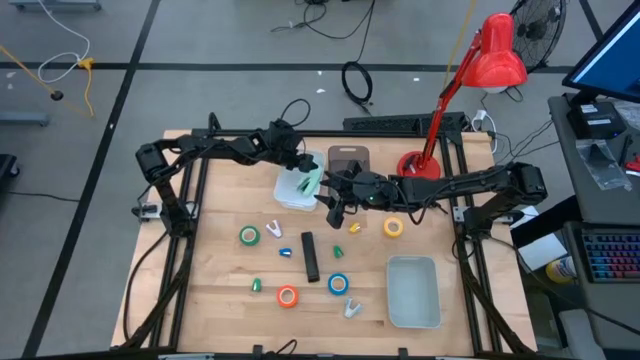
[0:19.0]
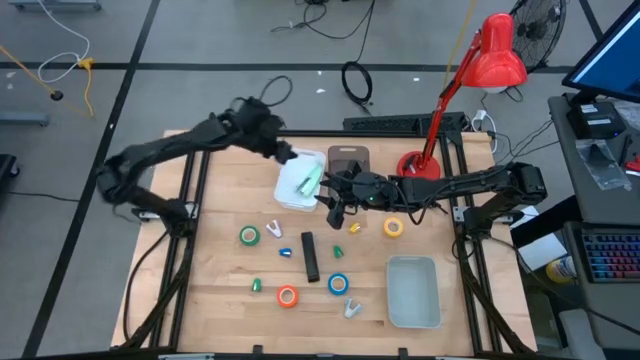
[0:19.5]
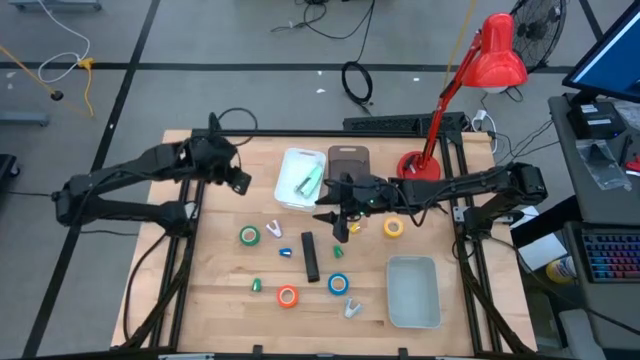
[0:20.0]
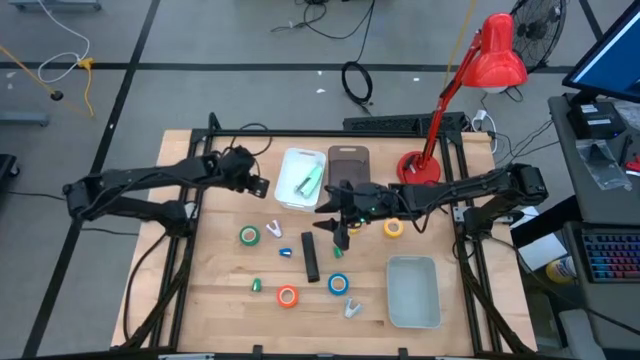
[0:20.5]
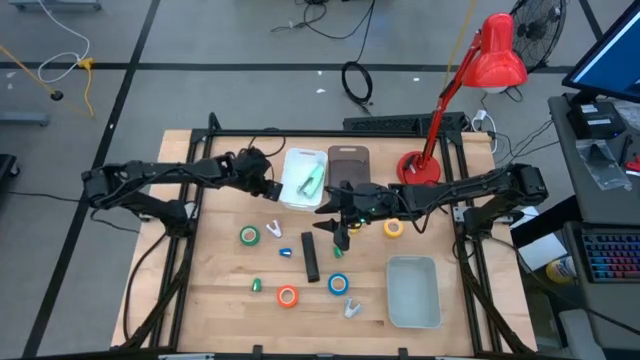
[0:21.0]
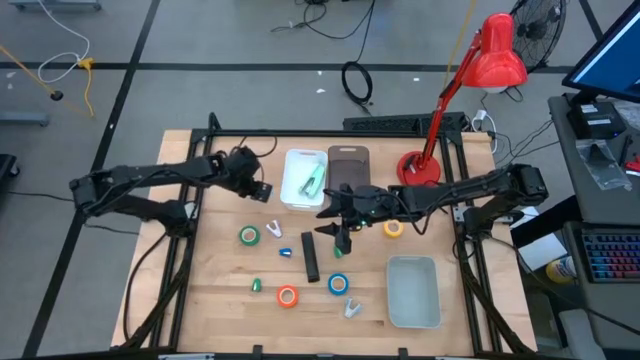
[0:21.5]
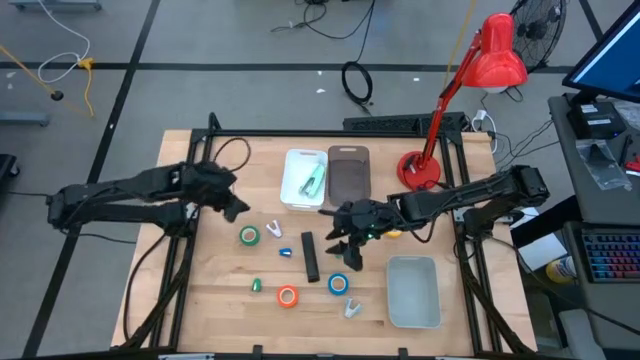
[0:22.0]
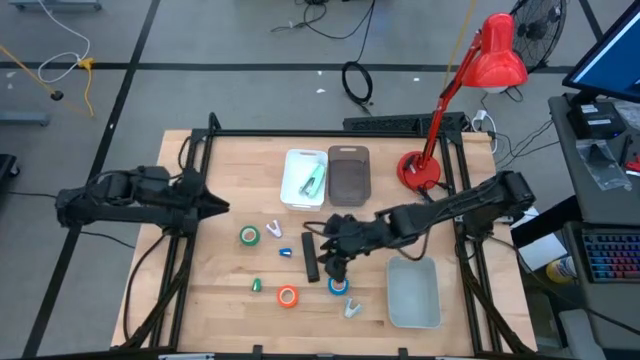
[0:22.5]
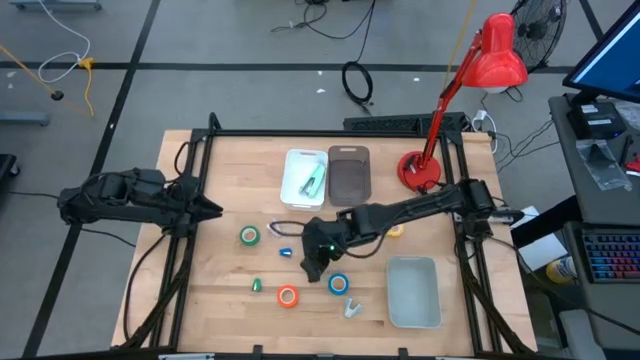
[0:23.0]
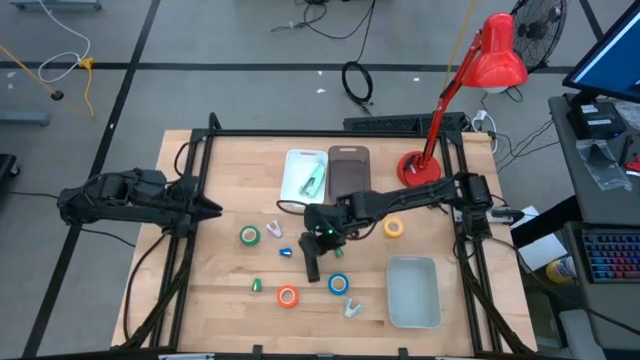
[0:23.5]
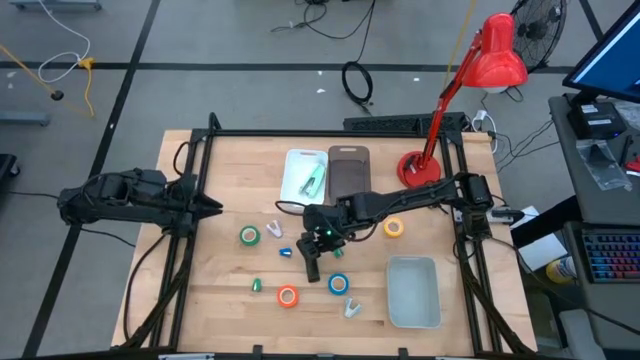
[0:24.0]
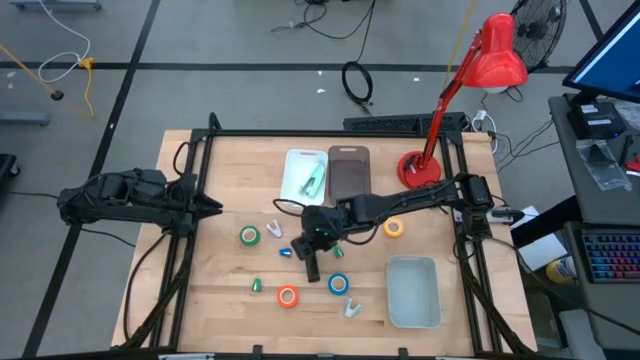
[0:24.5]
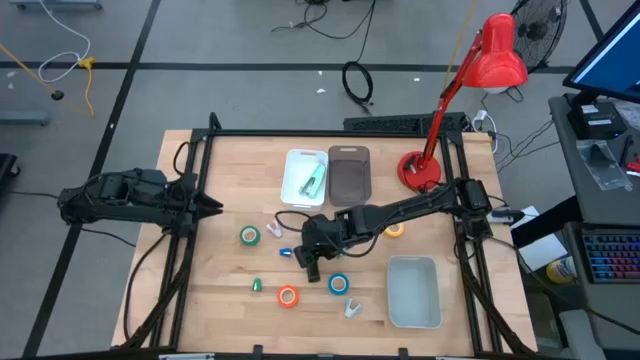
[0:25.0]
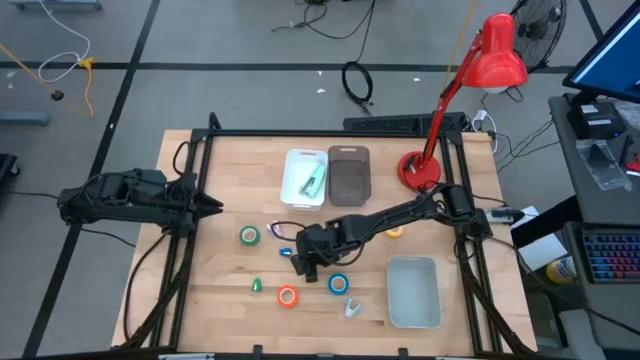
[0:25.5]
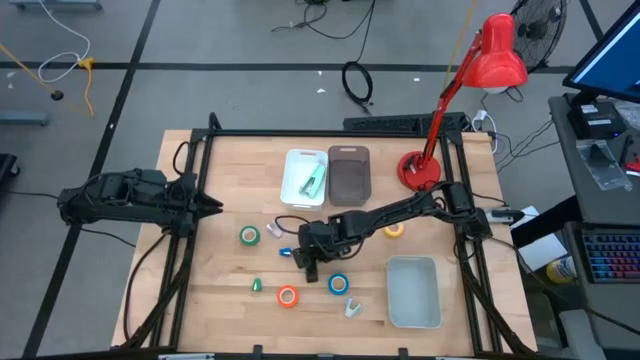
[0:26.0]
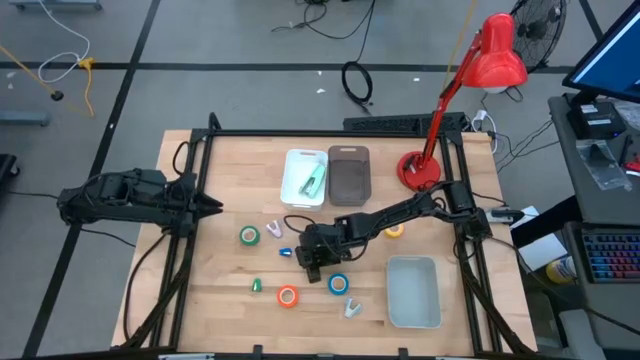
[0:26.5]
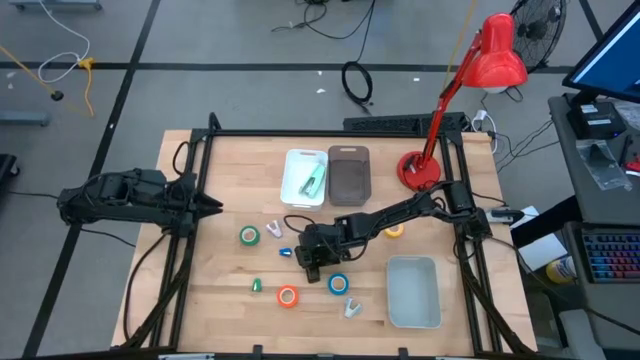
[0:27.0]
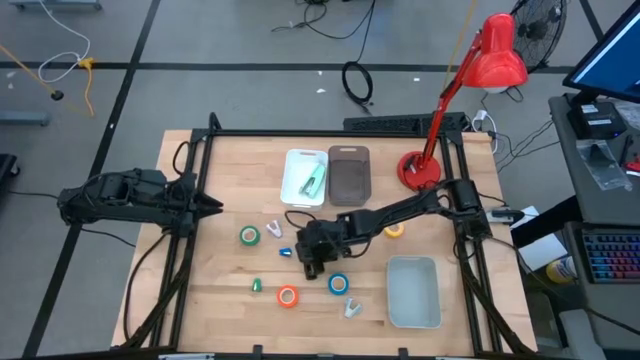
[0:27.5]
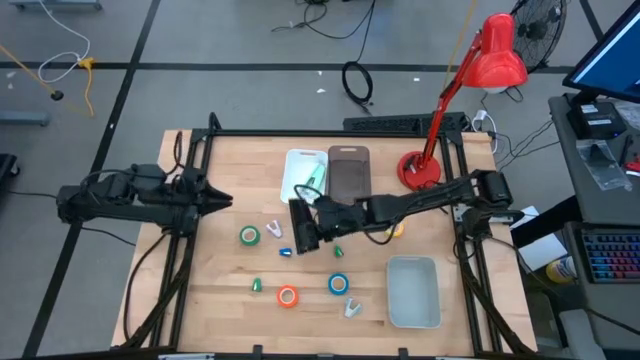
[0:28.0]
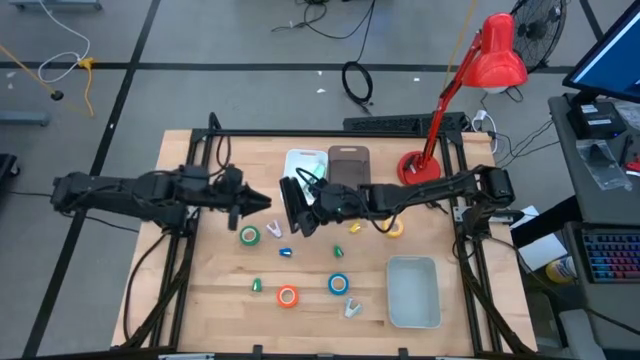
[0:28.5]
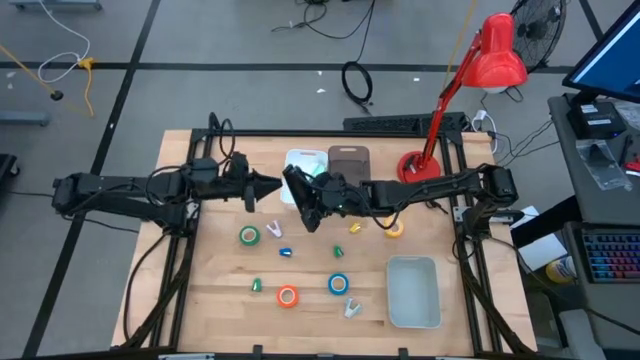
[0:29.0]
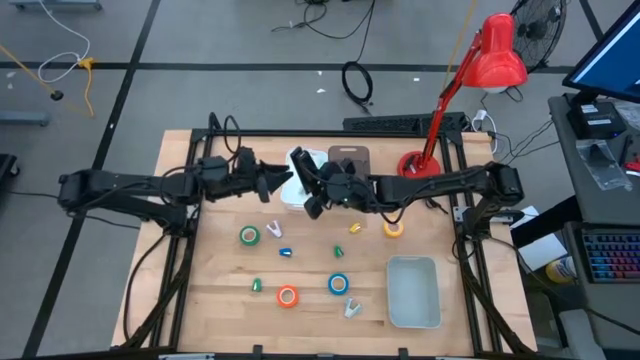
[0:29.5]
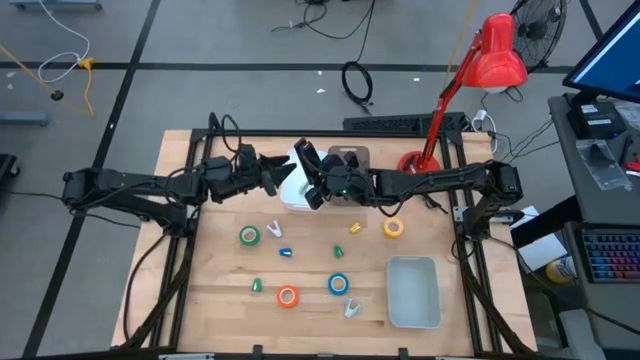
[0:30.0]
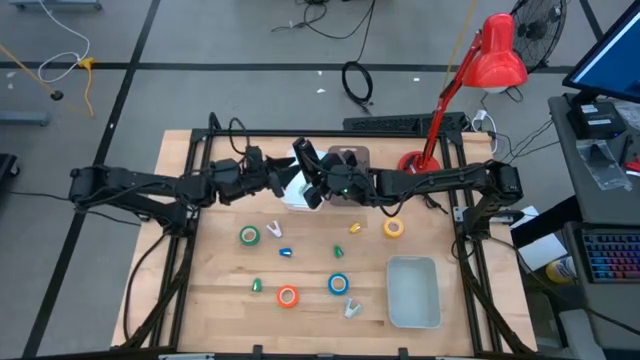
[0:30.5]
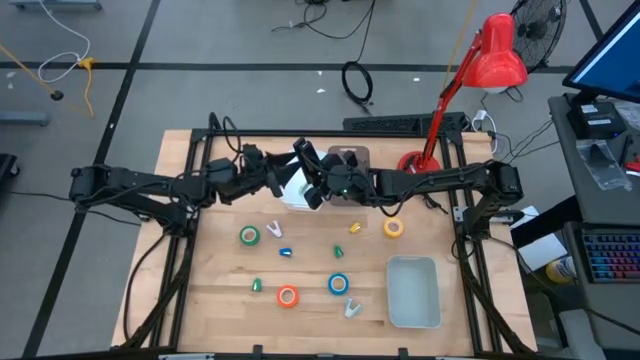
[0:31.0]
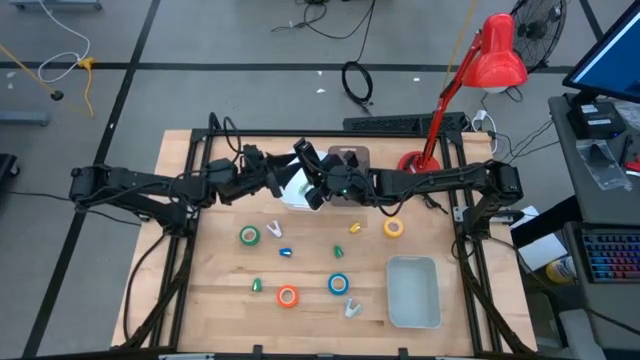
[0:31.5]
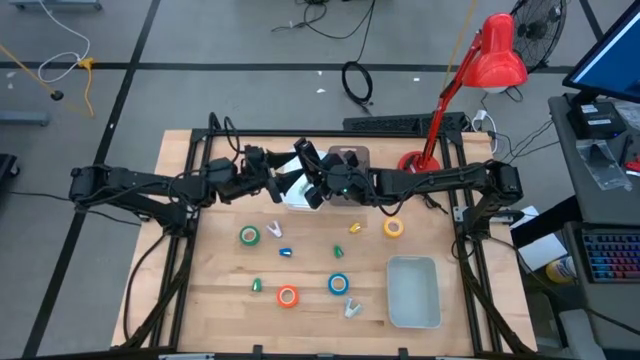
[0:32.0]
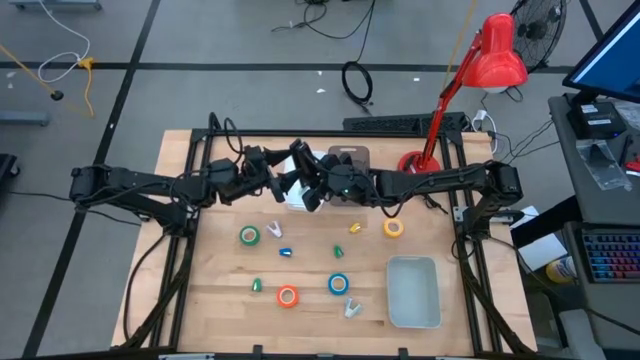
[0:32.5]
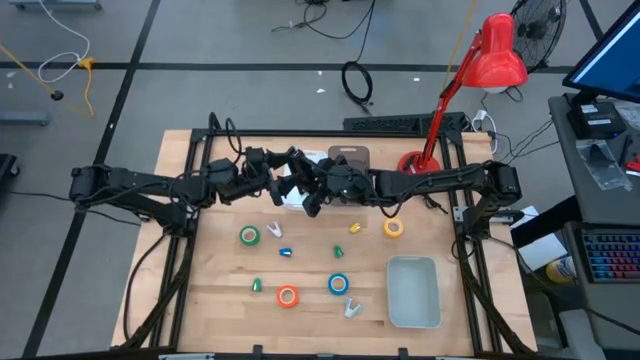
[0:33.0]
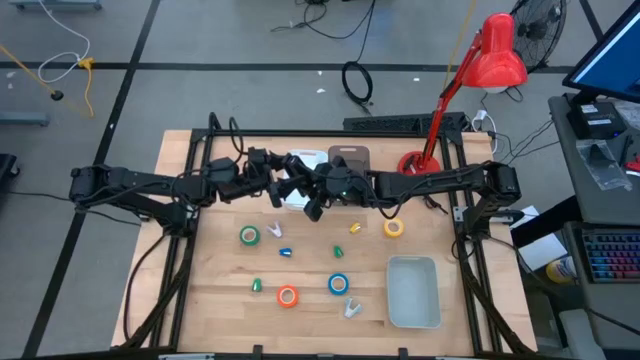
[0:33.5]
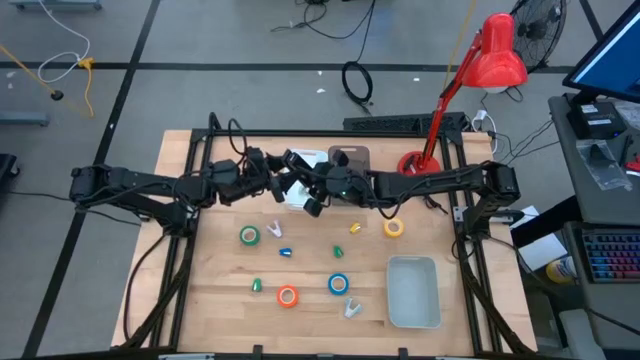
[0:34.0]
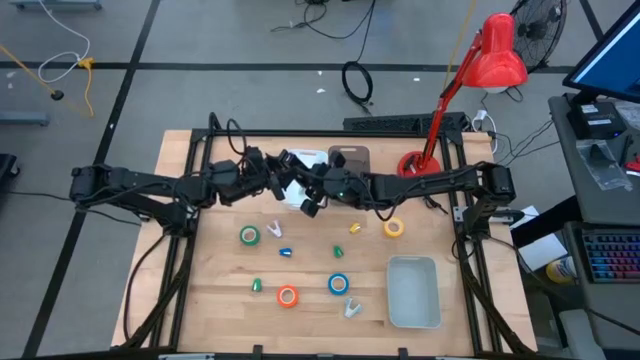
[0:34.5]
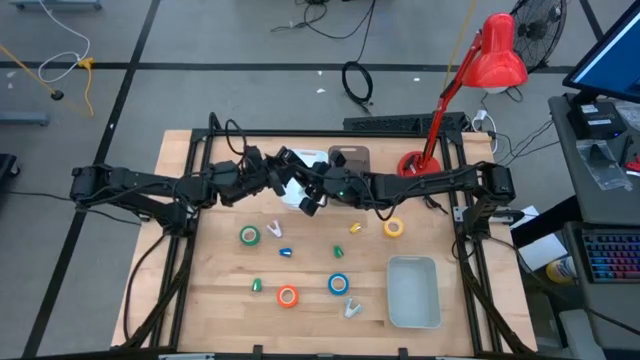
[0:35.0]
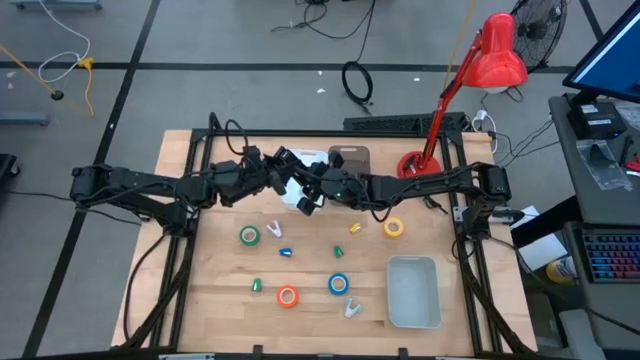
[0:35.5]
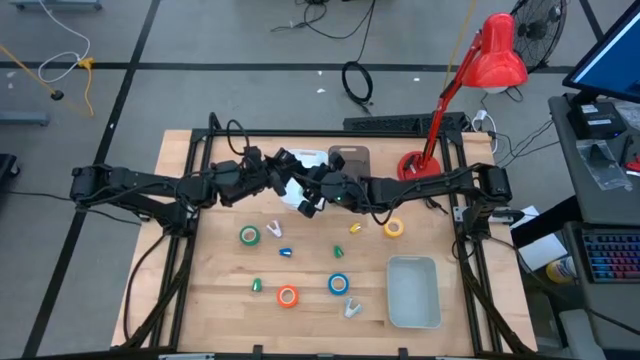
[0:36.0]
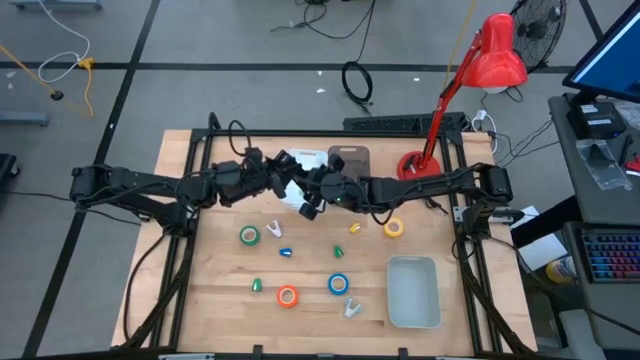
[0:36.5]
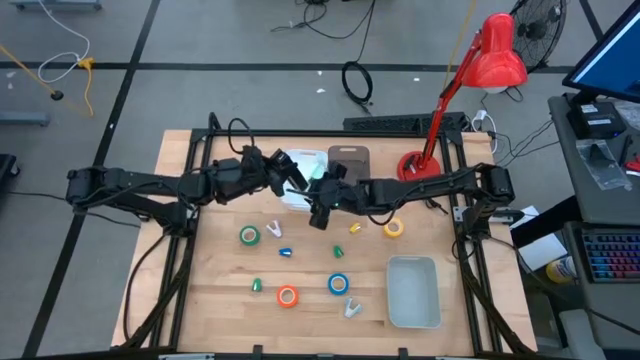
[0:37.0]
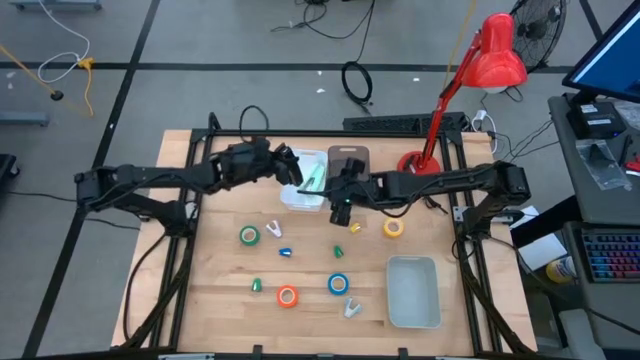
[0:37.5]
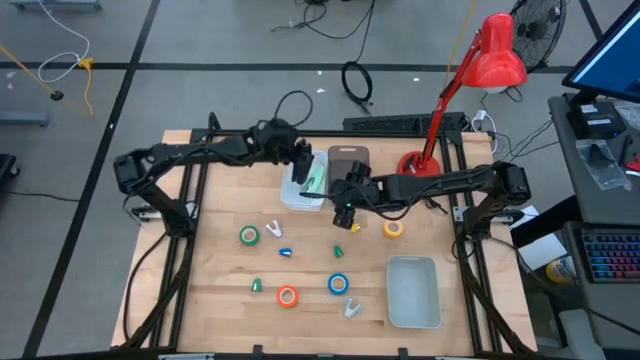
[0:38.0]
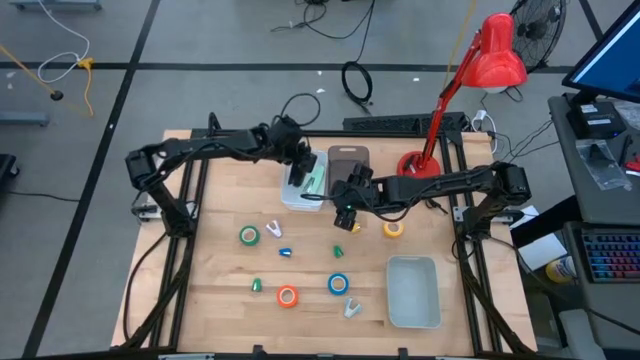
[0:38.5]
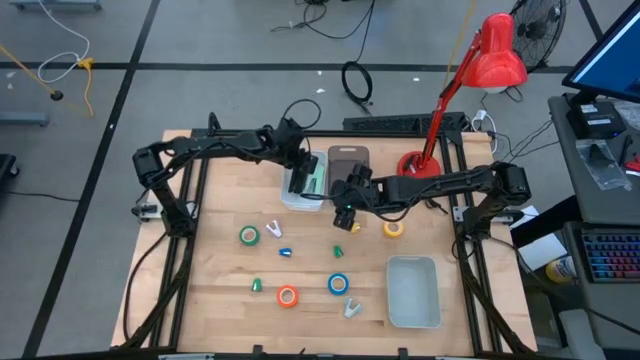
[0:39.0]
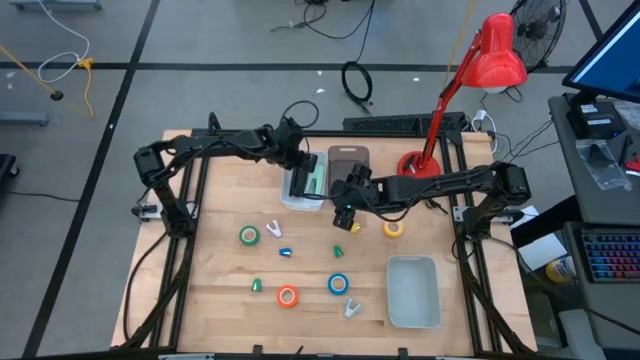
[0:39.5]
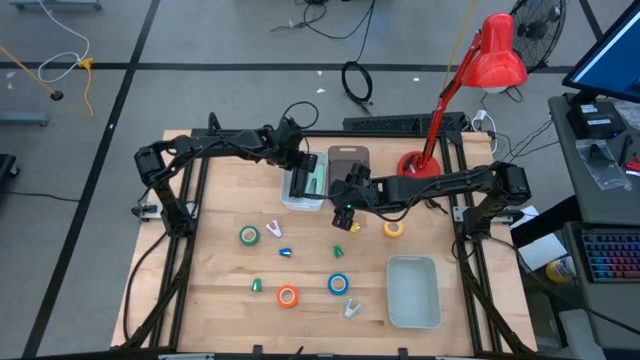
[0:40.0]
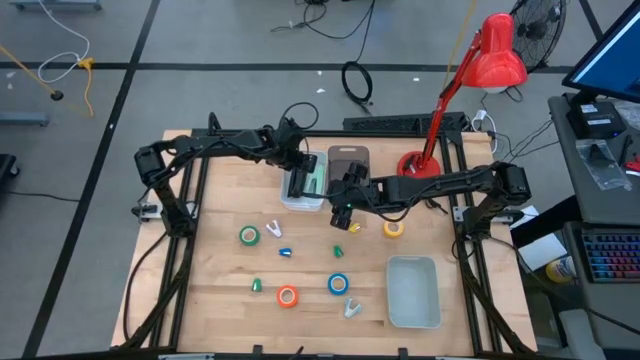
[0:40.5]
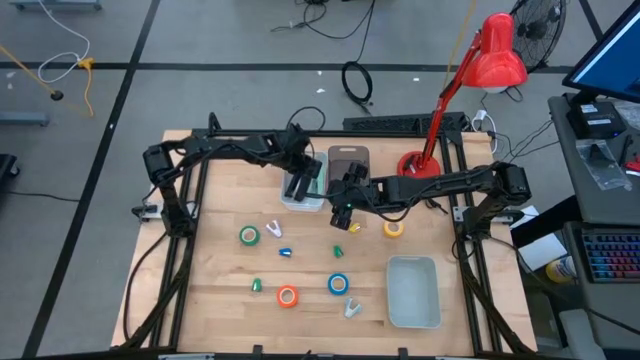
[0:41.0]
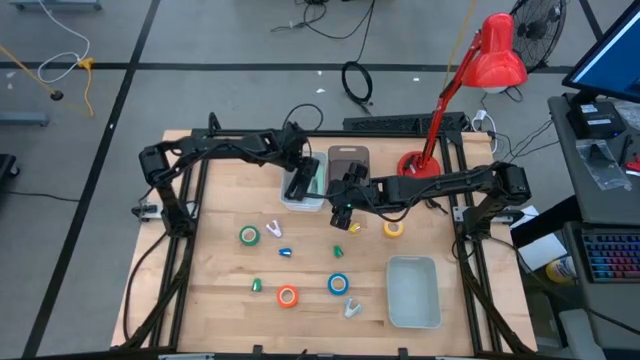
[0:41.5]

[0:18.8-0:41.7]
Task: Pick and place Stapler, Stapler remover, tape
Put the black stapler into the white bin
